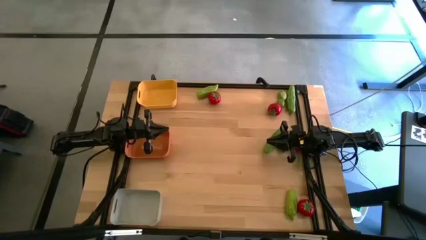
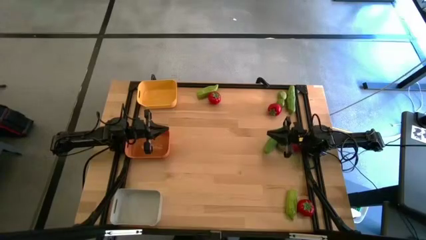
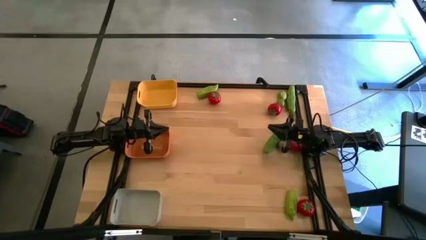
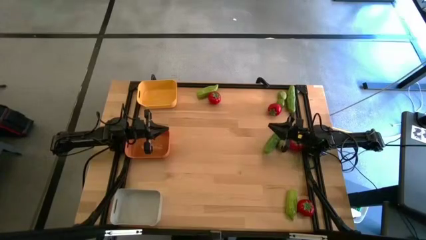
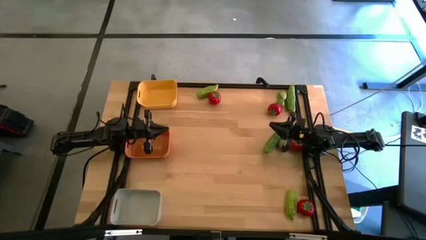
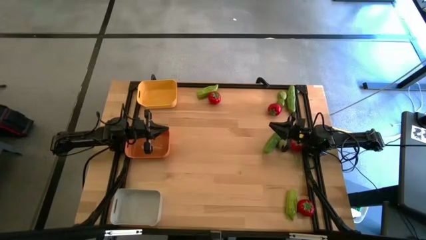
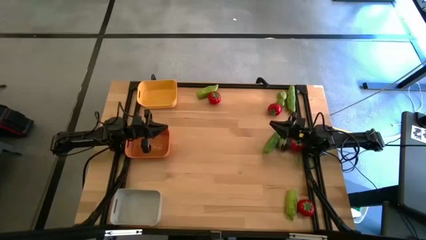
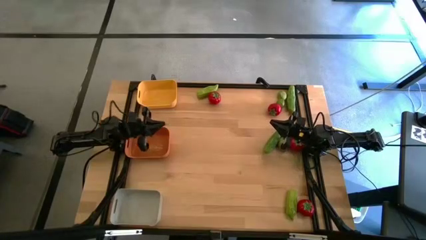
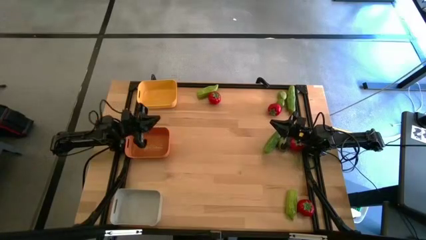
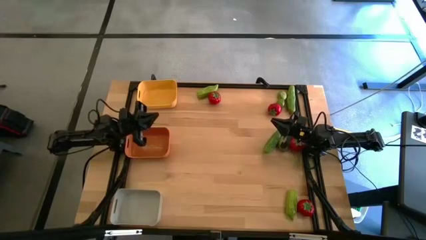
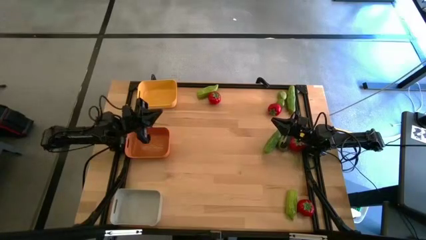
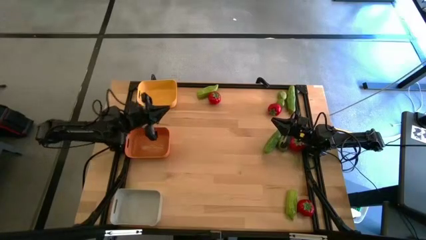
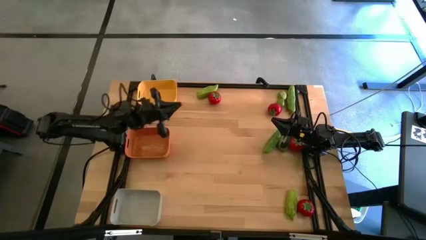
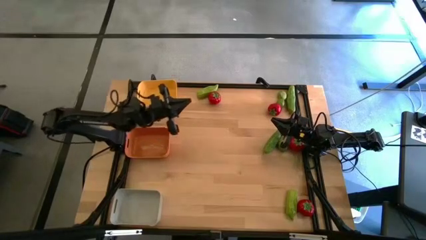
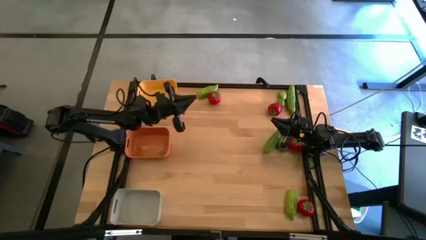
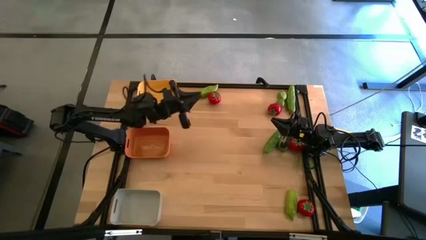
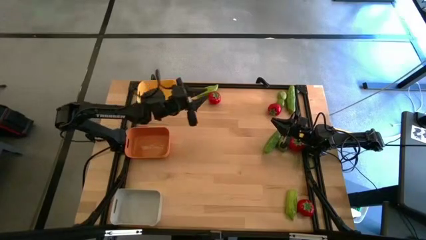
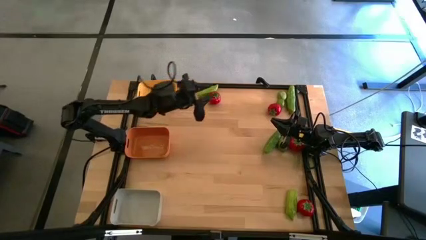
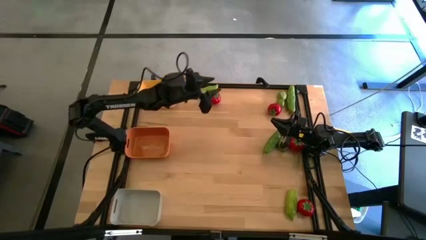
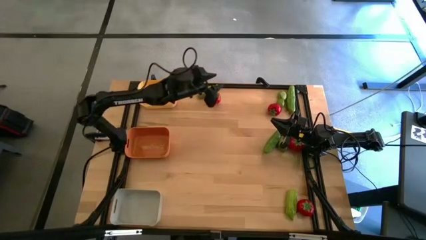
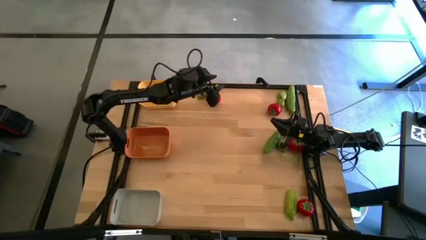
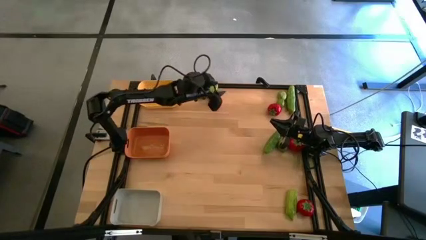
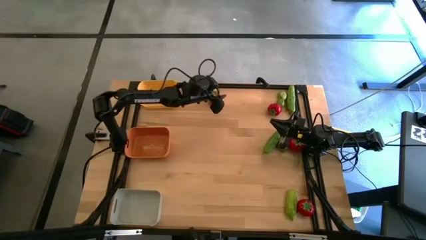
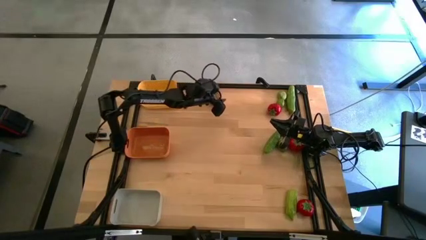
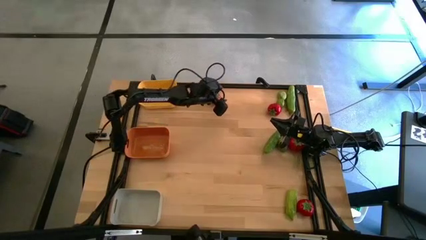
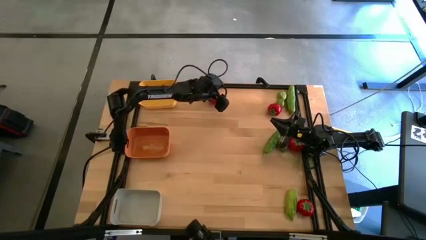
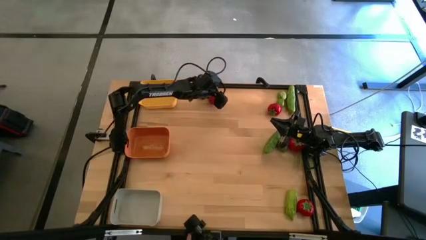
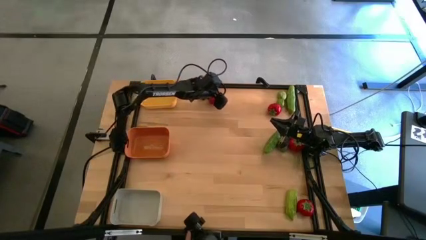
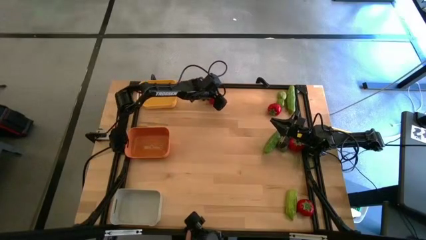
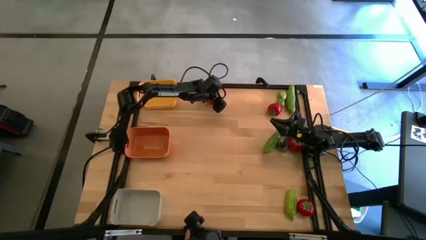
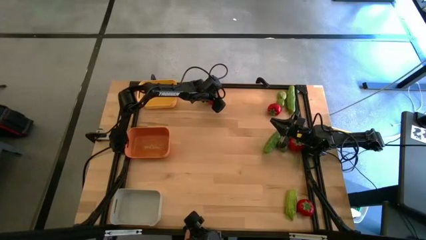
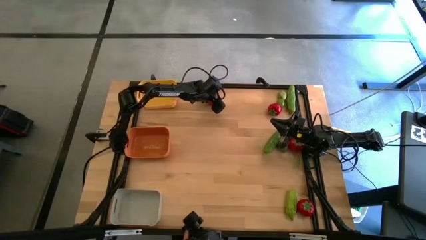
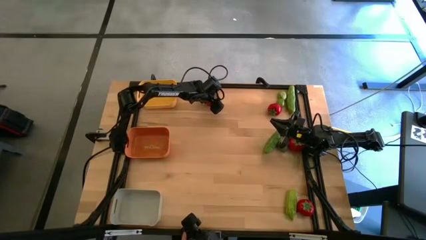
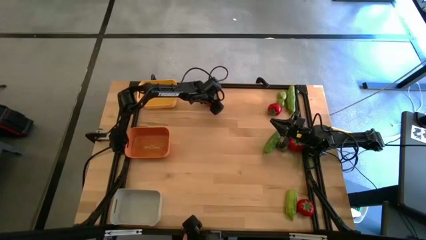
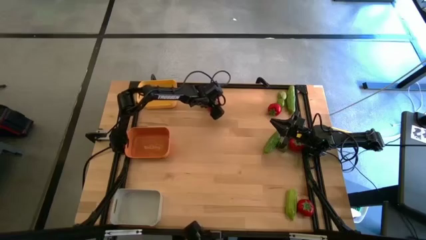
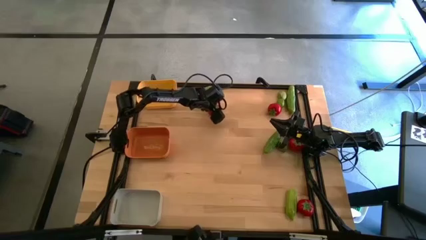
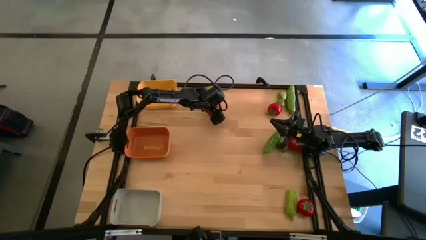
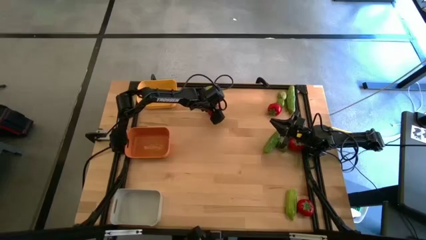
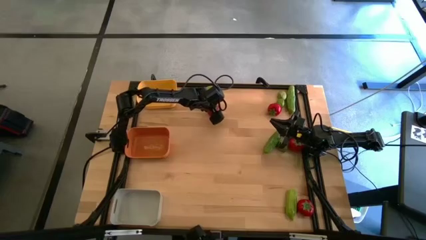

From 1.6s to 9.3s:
Task: Sort produce into baskets
Put the red tomato into the yellow bin

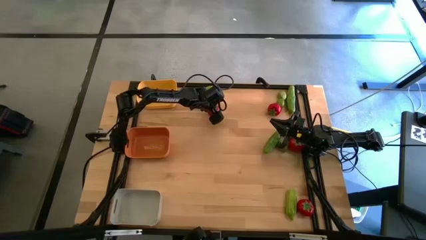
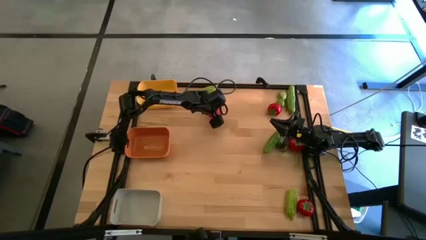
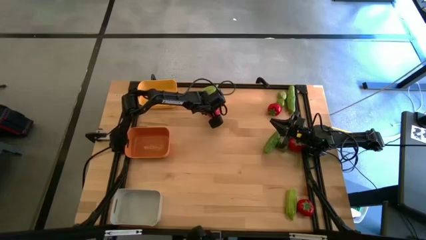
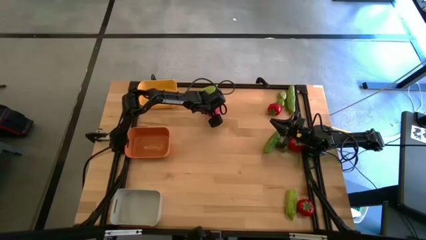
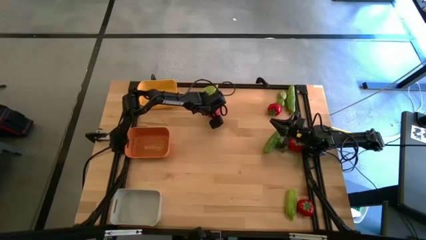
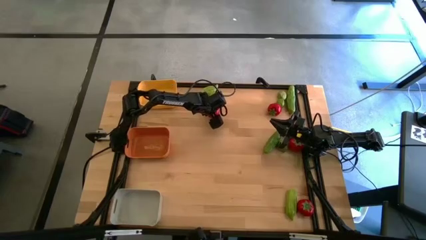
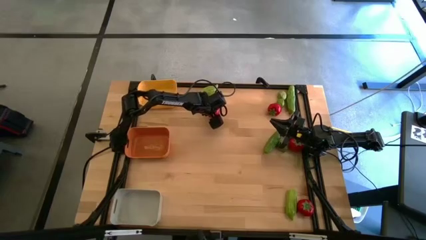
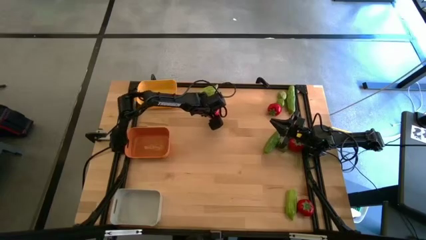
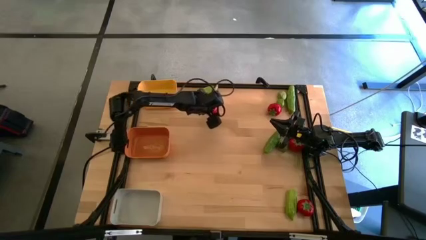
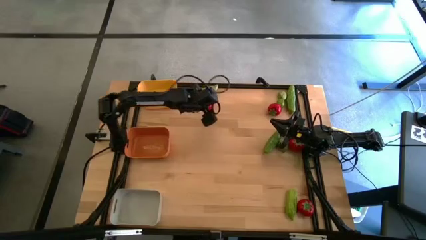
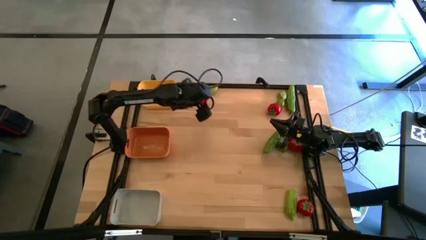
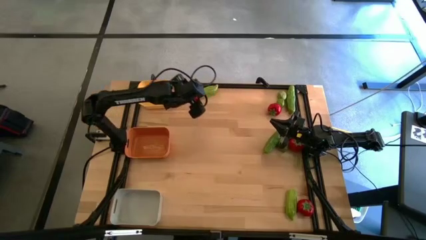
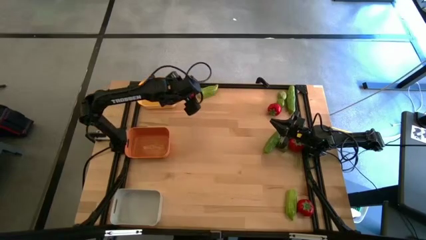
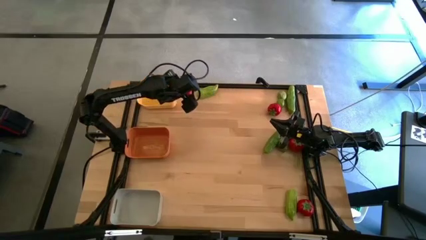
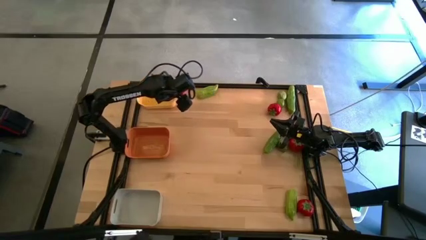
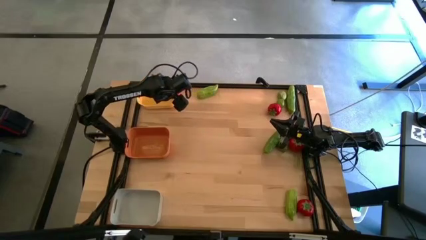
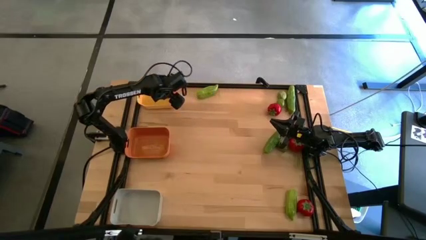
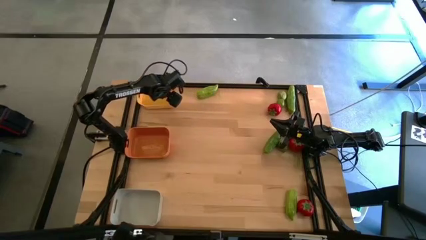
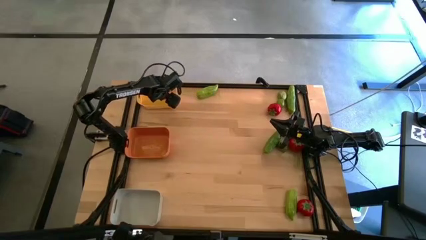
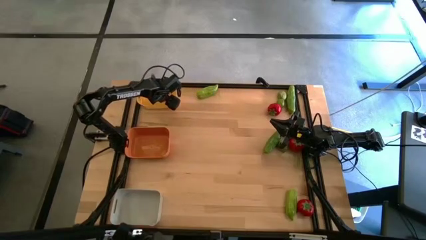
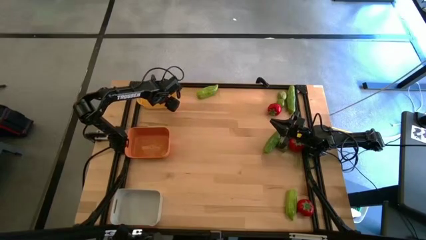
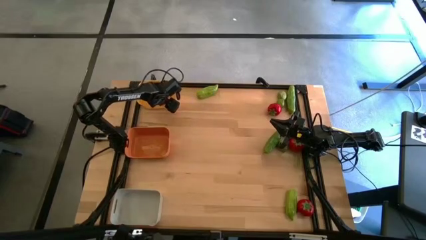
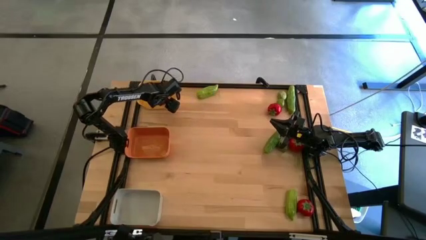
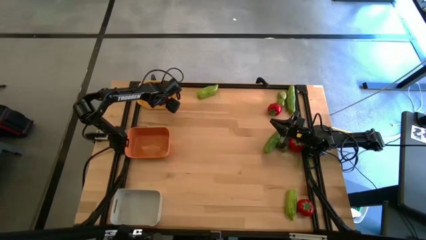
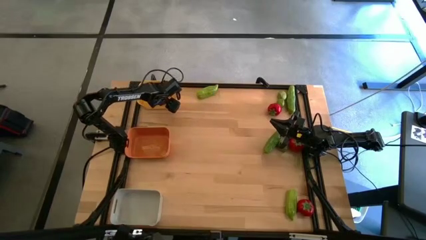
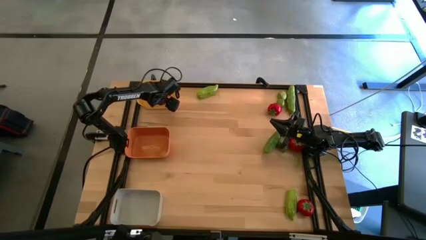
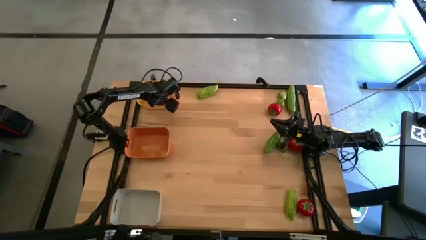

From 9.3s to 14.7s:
Put the top left red tomato into the yellow bin

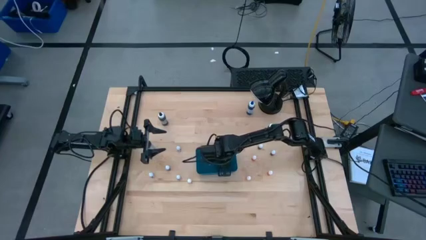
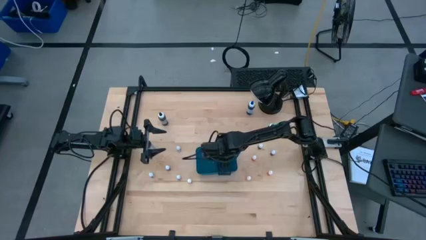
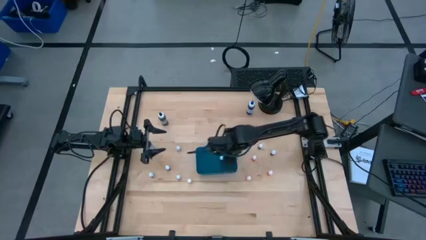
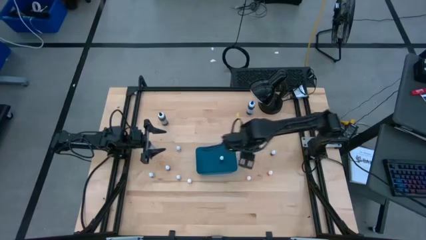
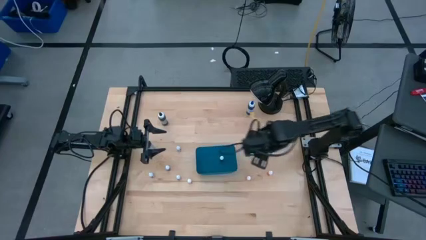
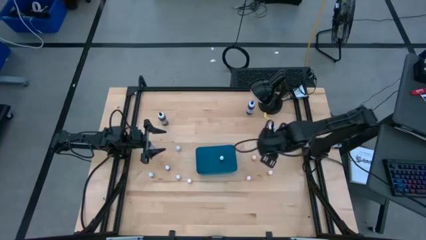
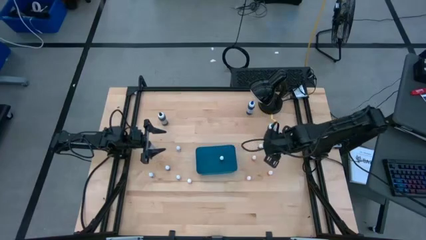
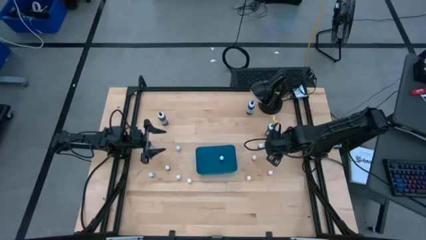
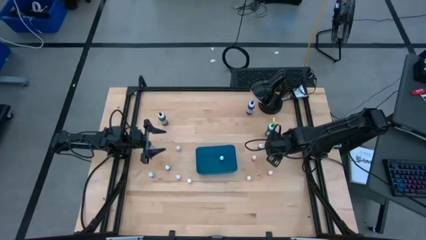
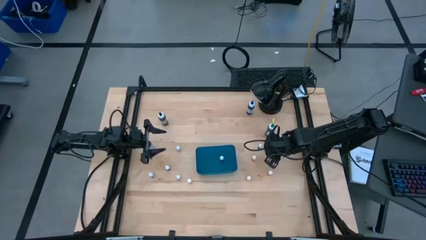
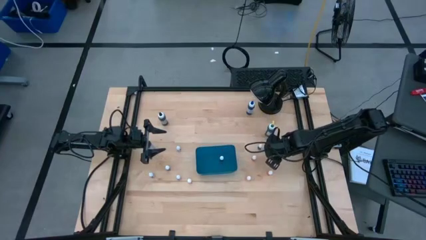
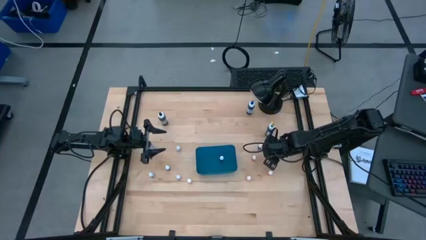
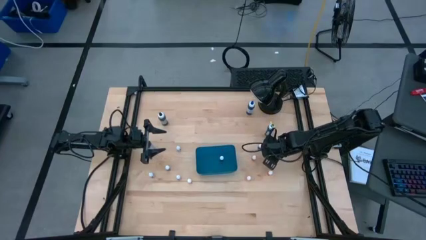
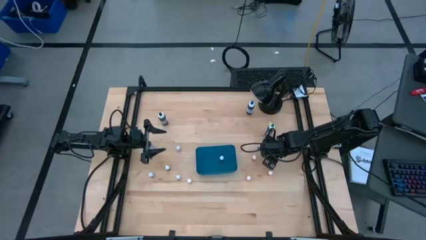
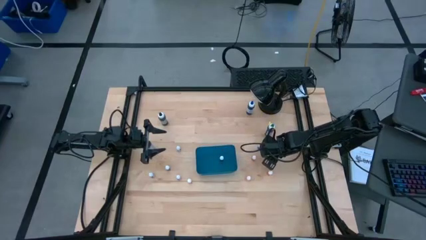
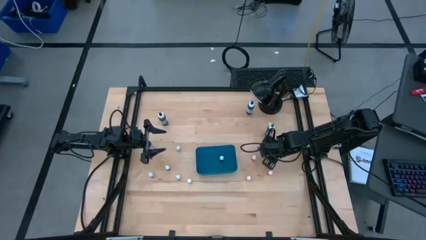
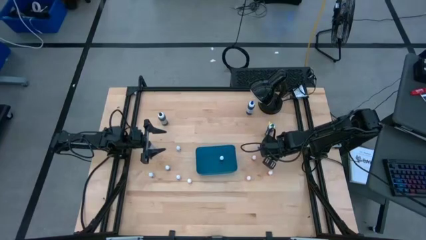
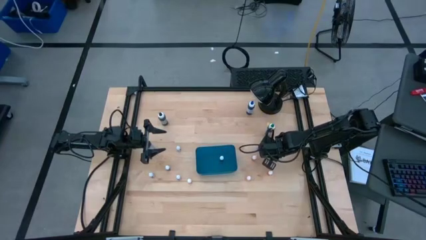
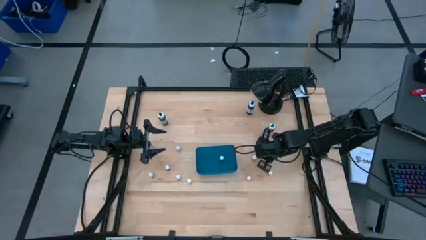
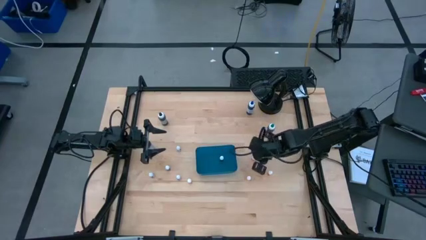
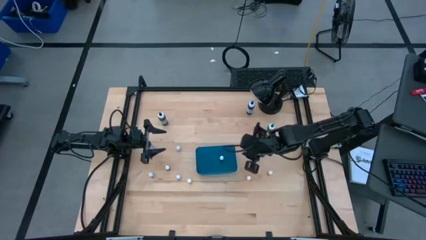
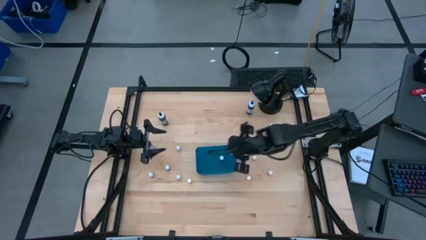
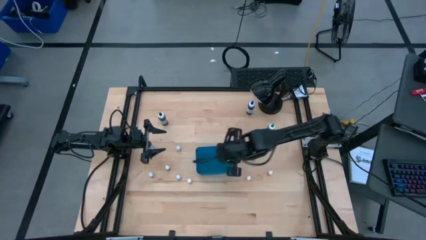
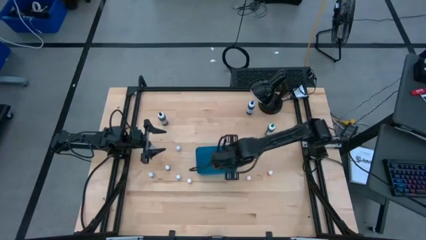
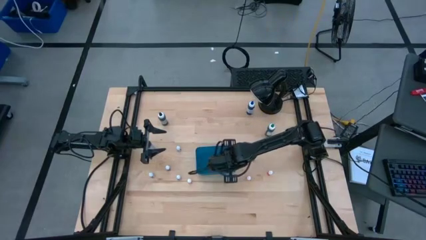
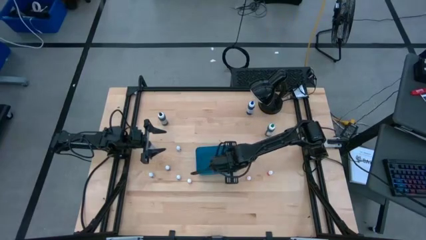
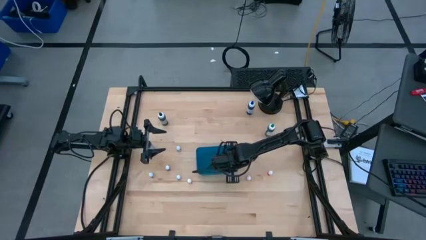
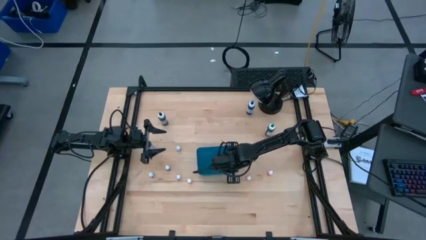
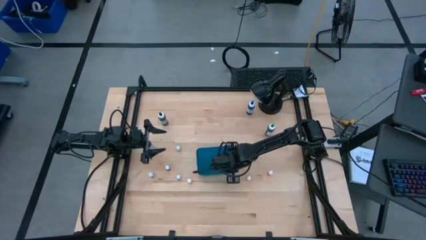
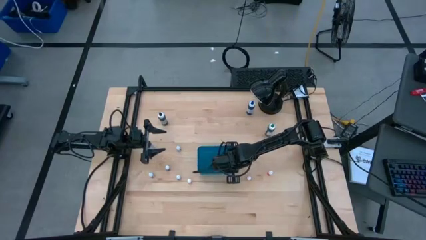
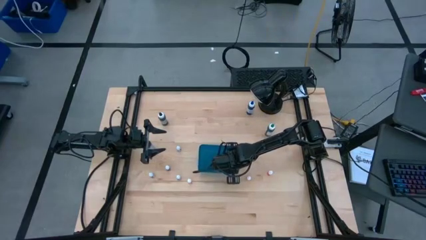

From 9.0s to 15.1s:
Task: Pick & Place food coloring
Put the small orange food coloring bottle into the blue bin
